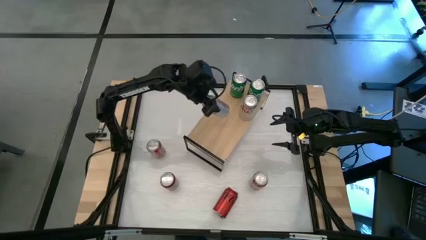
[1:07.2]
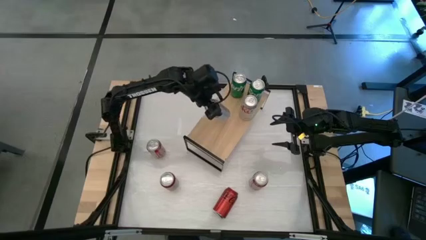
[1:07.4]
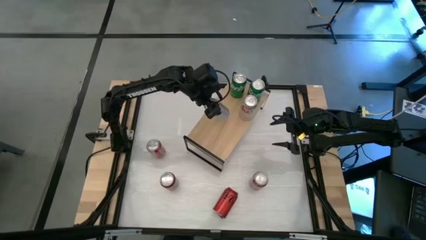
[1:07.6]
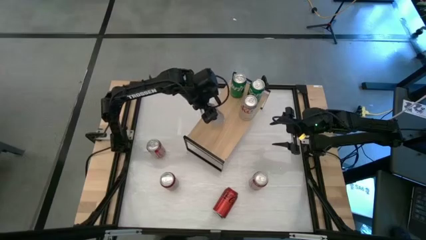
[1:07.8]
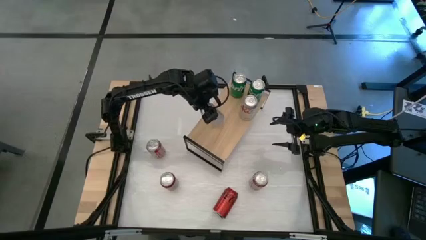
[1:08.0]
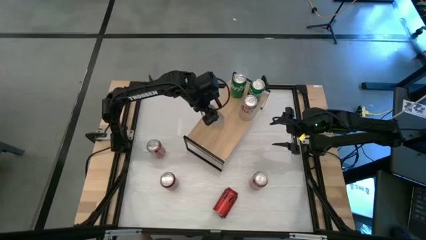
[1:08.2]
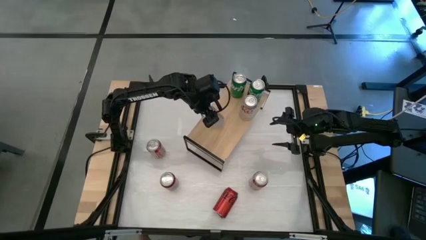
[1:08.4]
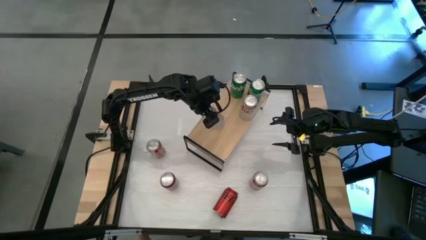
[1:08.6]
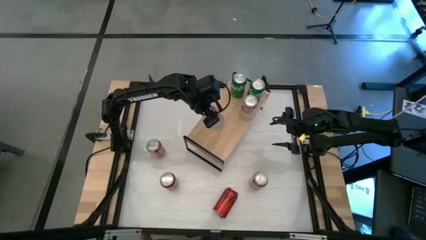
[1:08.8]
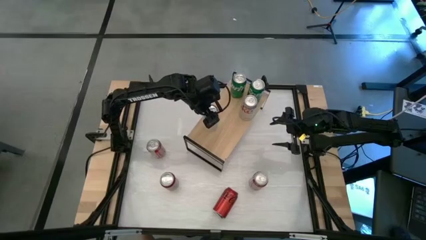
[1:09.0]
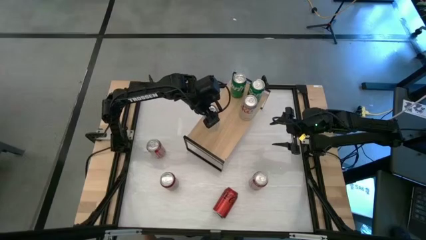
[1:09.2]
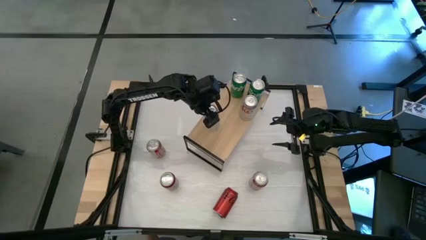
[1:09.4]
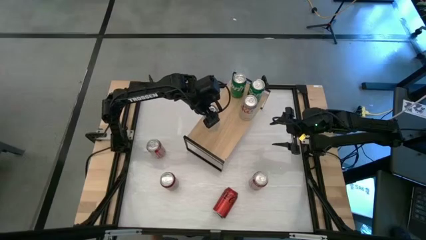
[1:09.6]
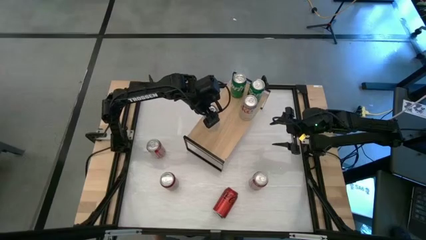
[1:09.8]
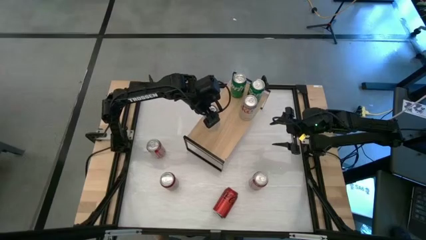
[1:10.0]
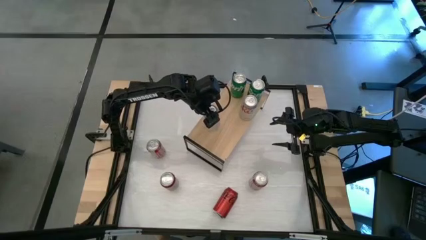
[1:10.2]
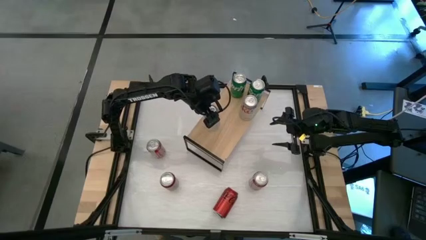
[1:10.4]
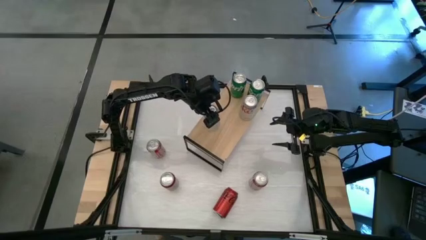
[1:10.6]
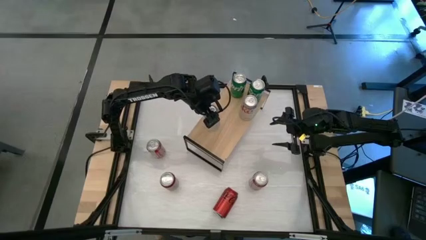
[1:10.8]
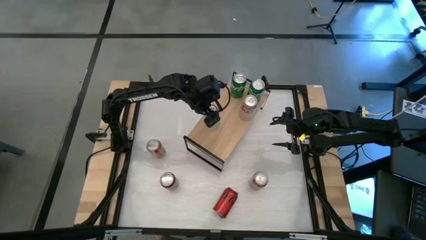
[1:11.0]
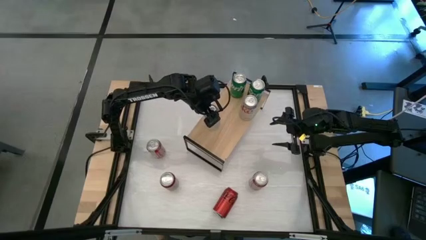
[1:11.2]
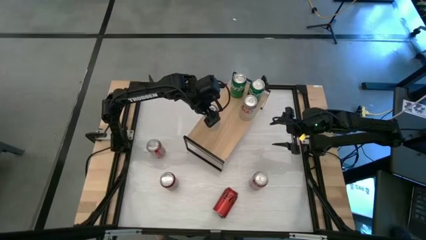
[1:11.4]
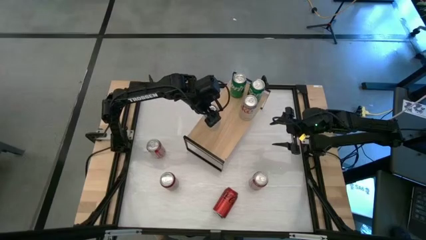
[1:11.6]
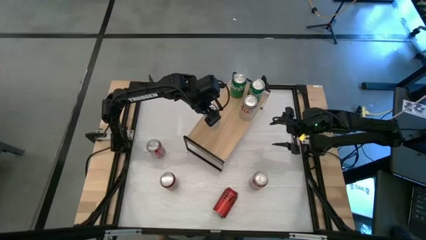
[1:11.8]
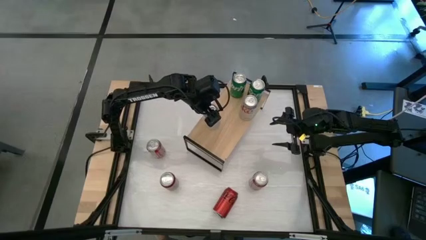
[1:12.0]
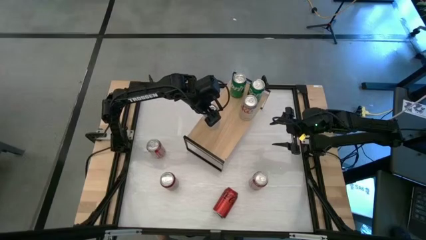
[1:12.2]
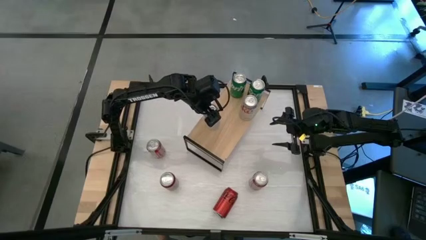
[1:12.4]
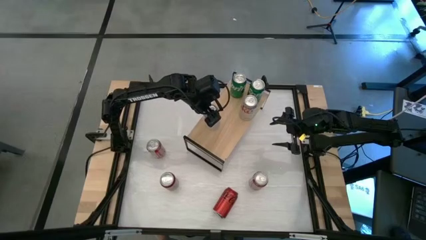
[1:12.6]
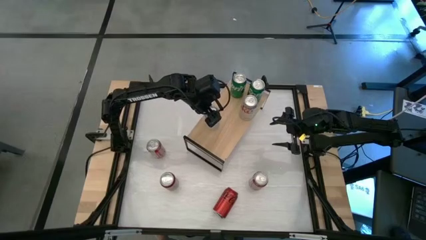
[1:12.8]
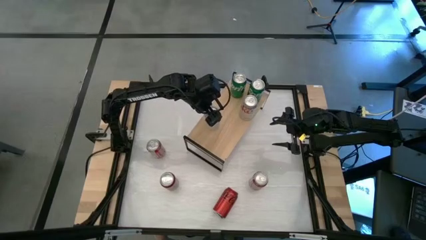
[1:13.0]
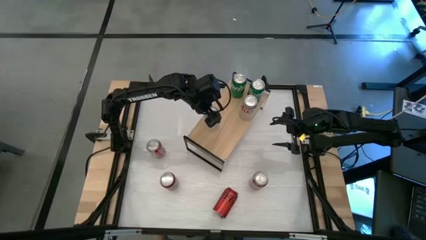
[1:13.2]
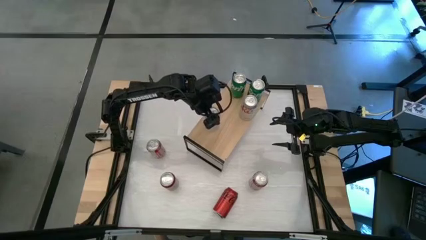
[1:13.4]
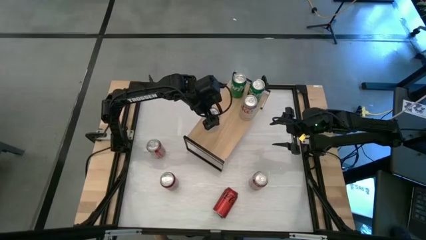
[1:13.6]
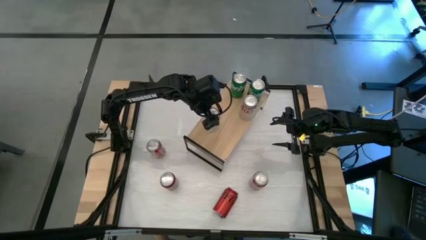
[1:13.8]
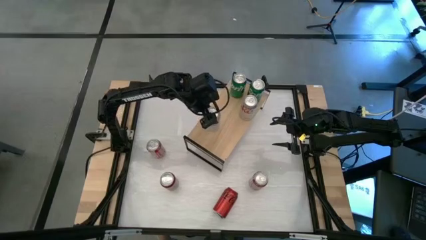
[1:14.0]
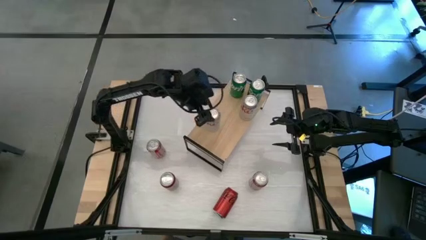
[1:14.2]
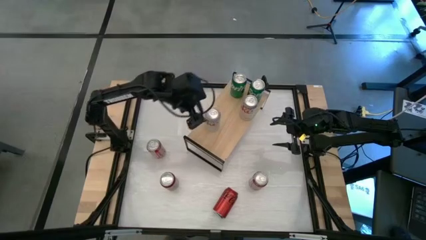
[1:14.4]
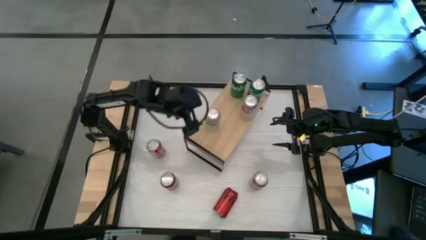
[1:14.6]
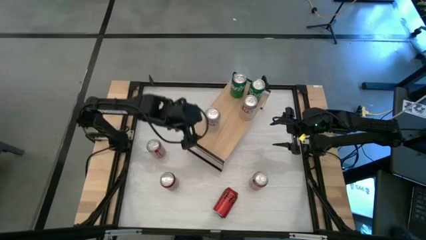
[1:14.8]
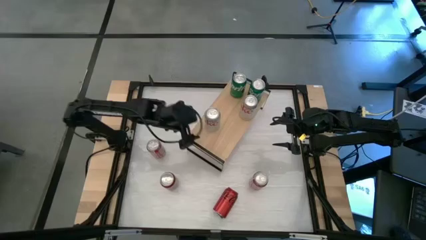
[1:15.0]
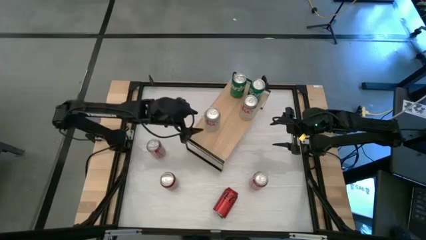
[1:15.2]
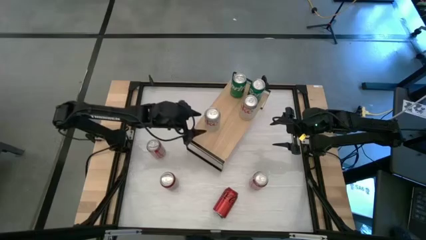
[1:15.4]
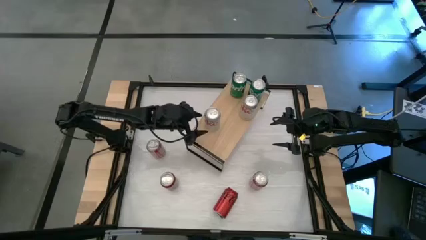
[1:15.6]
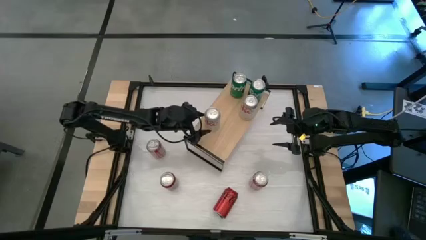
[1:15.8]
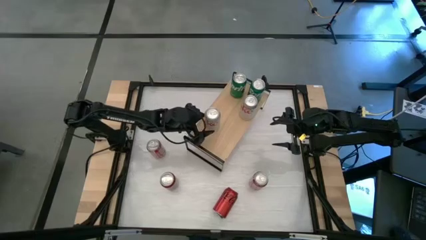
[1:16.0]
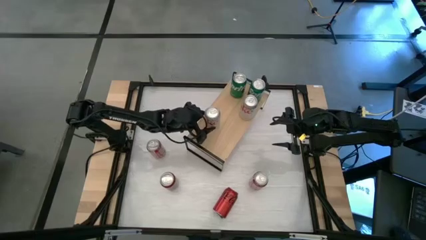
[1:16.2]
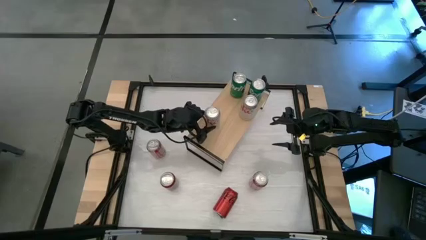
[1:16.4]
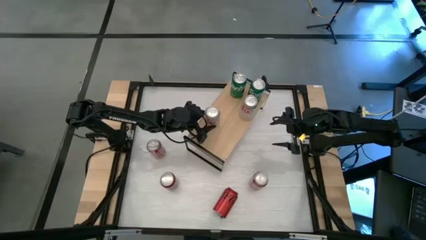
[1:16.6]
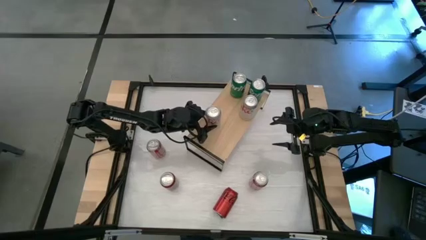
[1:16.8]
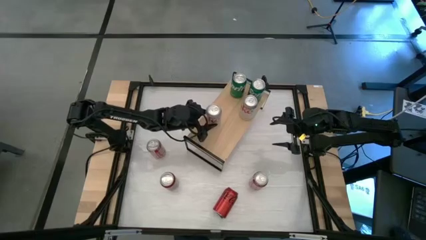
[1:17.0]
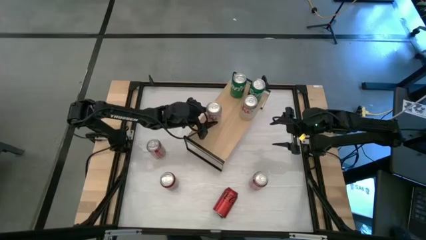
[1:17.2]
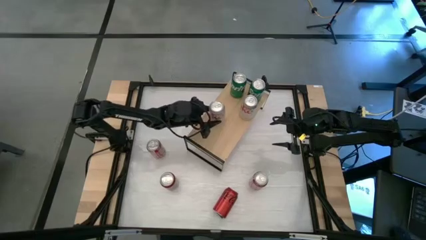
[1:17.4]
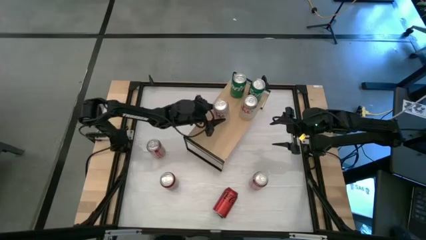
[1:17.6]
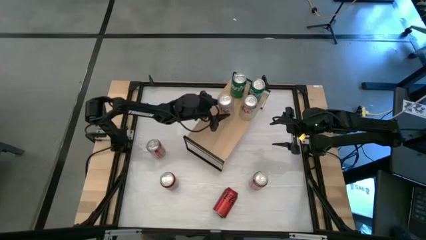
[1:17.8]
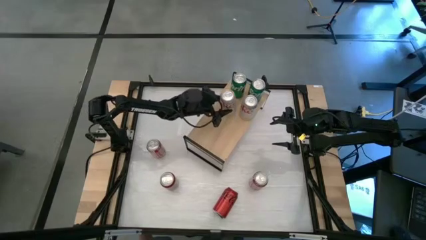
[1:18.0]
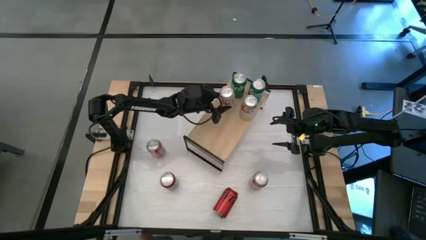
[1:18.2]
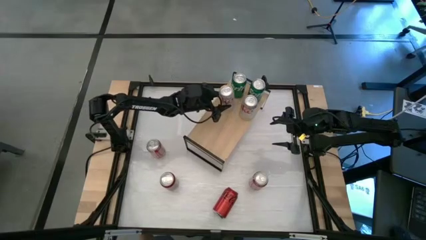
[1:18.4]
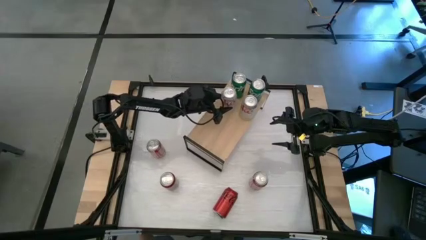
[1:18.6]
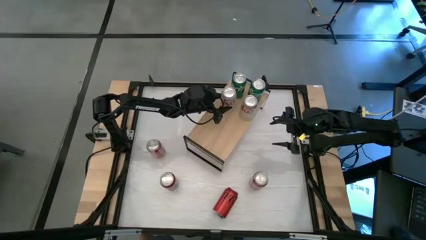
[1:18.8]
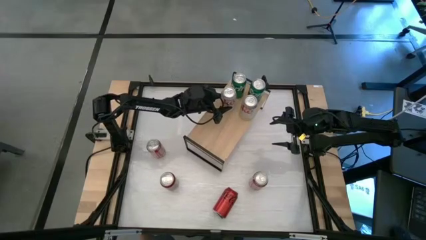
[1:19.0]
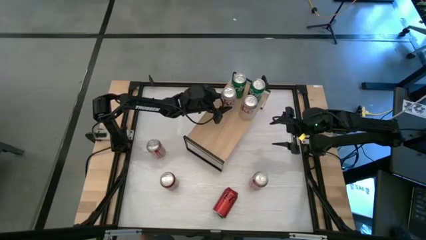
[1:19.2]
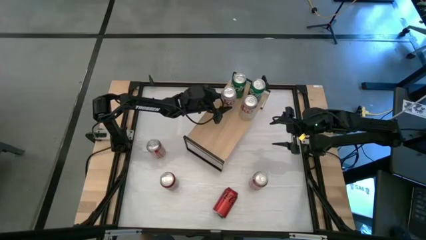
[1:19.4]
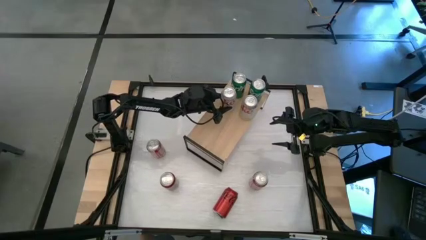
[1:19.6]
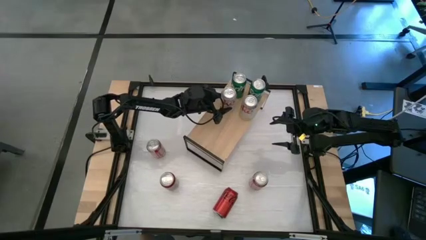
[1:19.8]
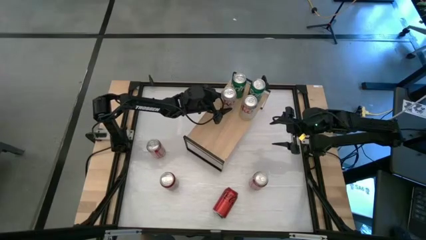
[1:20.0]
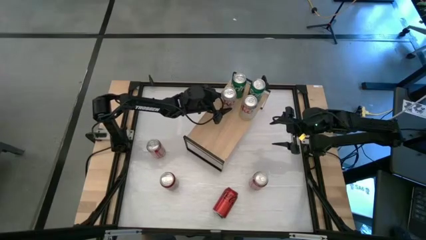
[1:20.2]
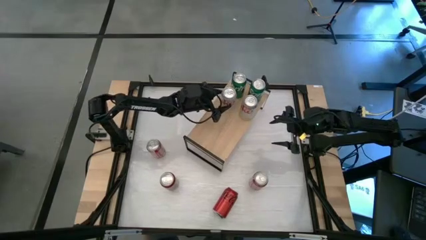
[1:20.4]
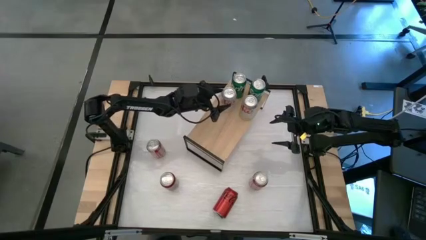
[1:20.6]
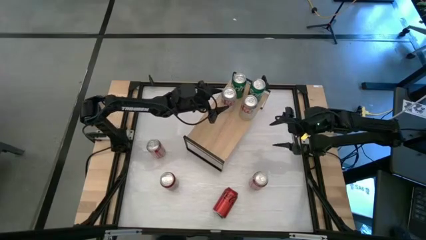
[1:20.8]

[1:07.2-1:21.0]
Task: Place canned beverage on shelf
Put the red-silver soda can on the shelf aligned with the other red-silver soda can
